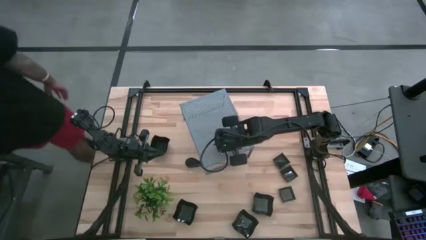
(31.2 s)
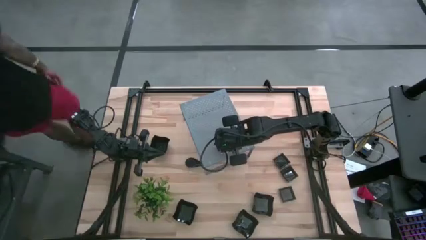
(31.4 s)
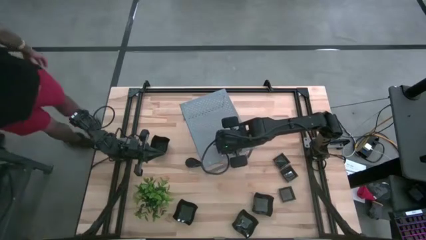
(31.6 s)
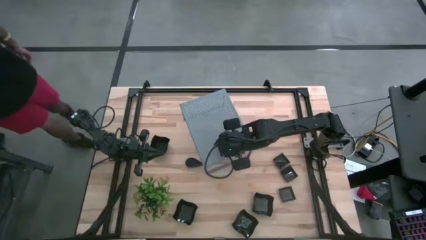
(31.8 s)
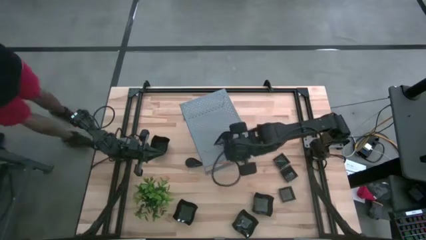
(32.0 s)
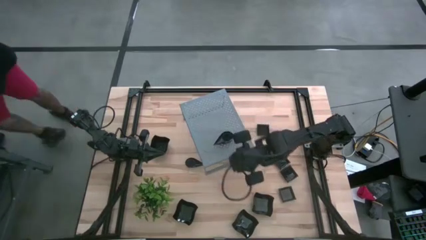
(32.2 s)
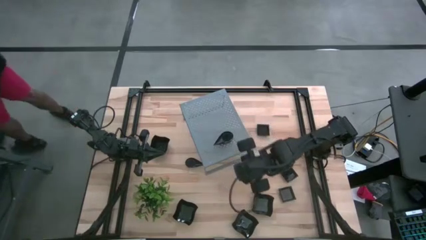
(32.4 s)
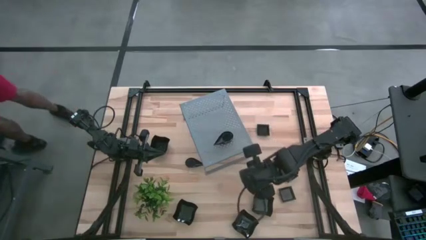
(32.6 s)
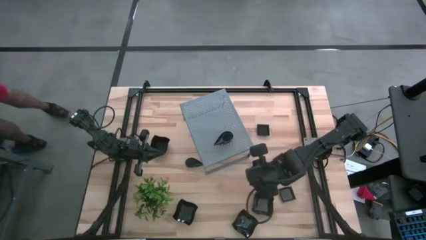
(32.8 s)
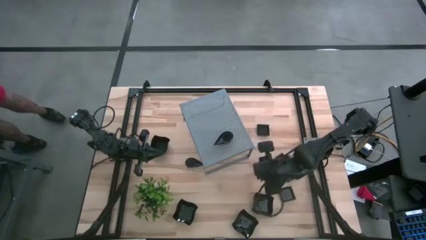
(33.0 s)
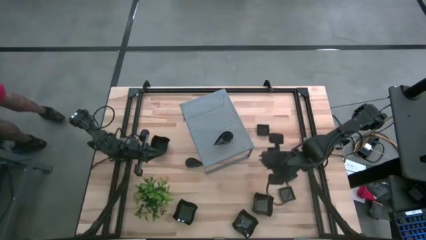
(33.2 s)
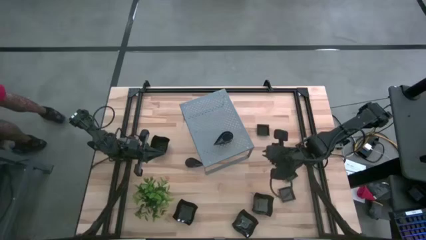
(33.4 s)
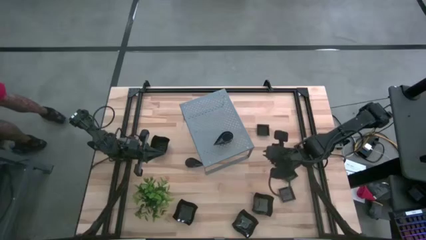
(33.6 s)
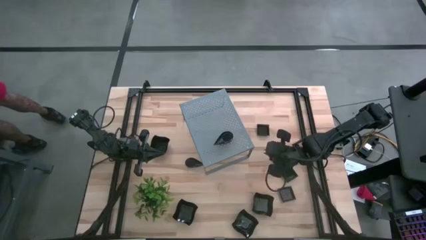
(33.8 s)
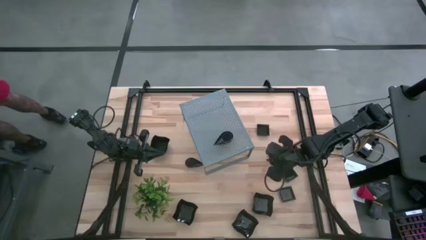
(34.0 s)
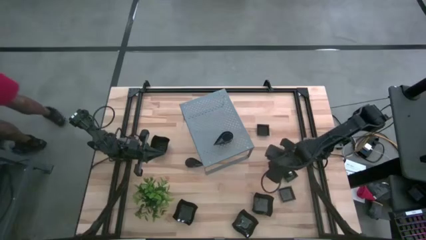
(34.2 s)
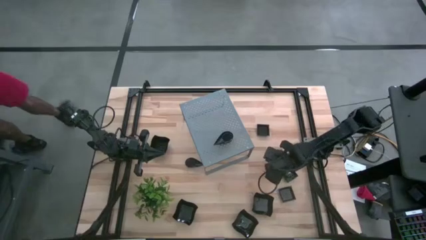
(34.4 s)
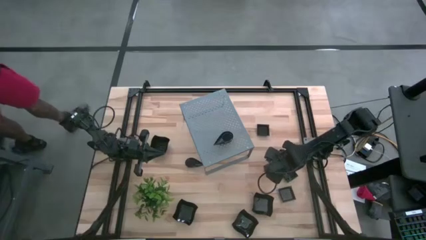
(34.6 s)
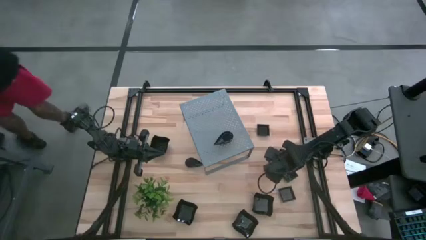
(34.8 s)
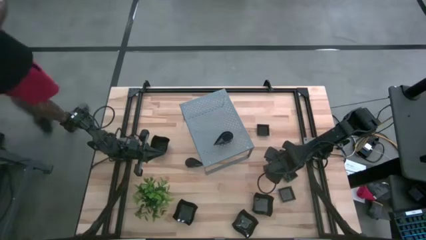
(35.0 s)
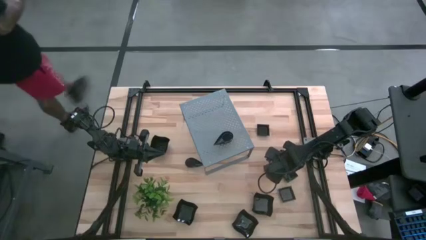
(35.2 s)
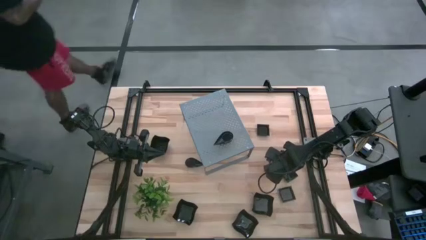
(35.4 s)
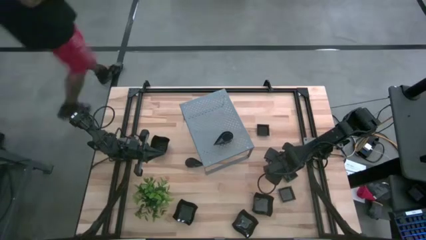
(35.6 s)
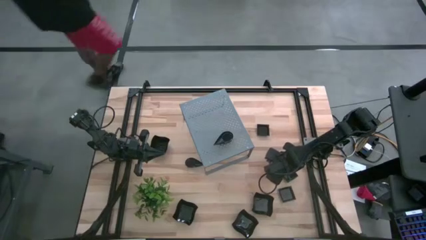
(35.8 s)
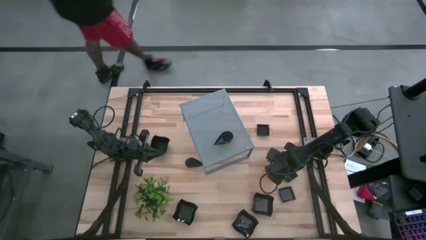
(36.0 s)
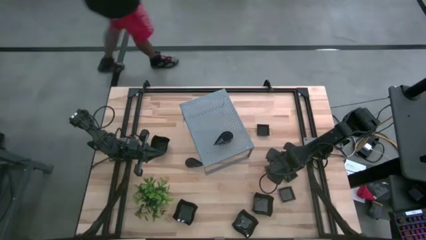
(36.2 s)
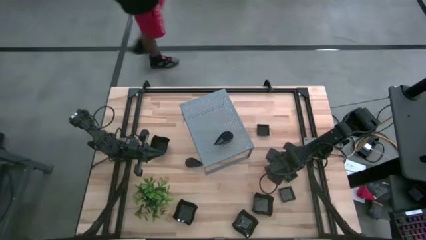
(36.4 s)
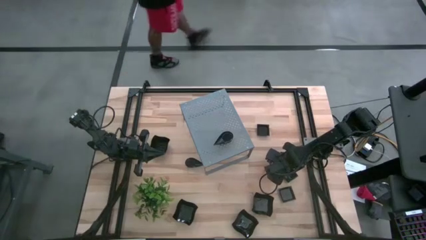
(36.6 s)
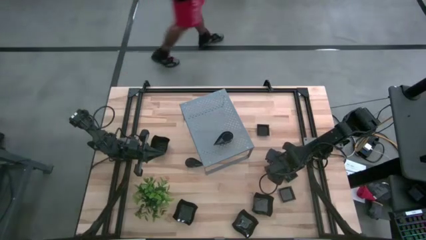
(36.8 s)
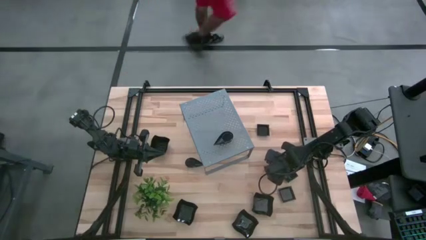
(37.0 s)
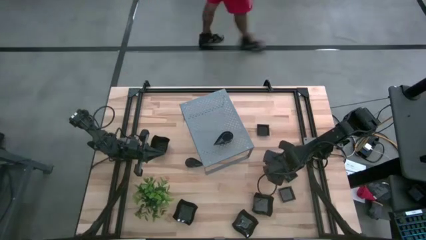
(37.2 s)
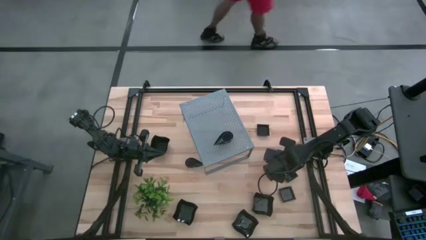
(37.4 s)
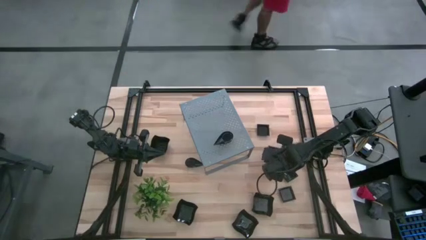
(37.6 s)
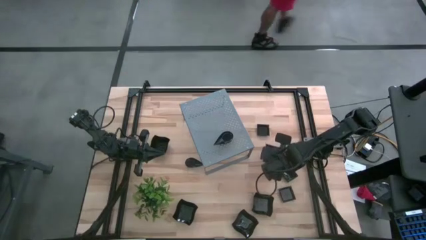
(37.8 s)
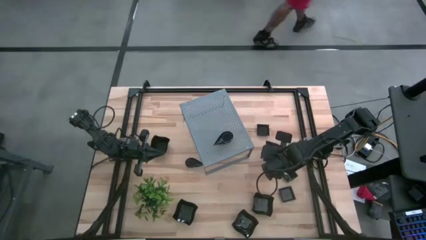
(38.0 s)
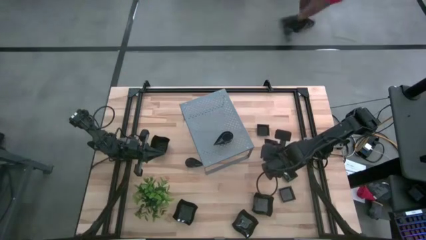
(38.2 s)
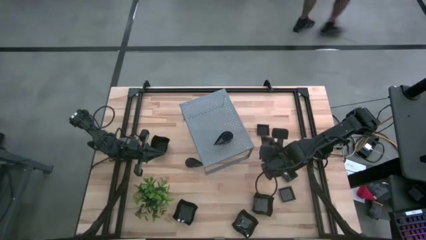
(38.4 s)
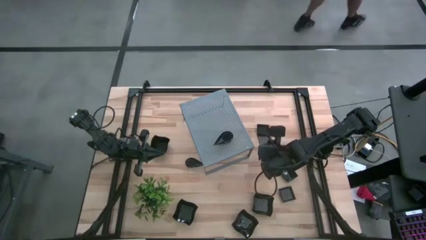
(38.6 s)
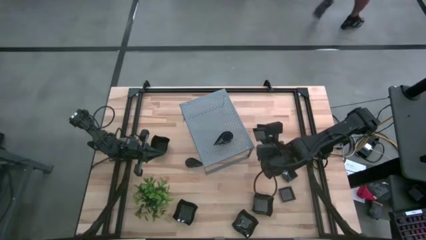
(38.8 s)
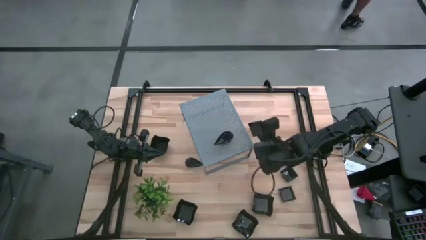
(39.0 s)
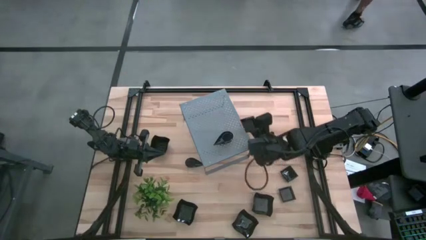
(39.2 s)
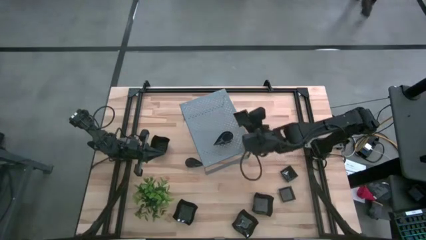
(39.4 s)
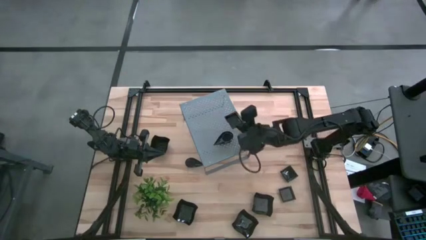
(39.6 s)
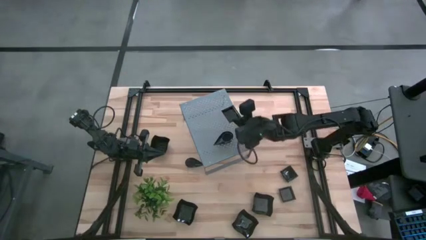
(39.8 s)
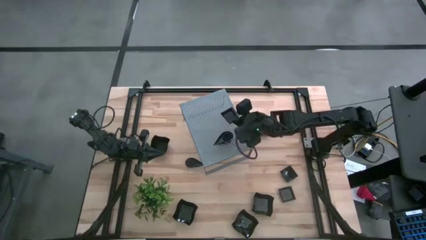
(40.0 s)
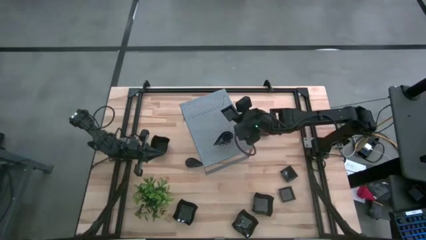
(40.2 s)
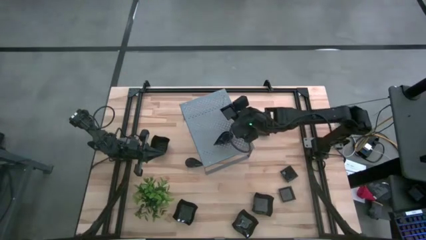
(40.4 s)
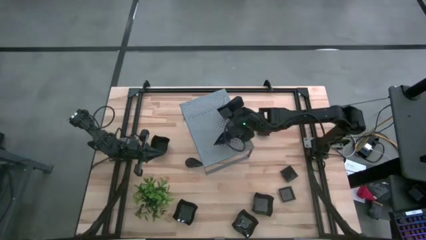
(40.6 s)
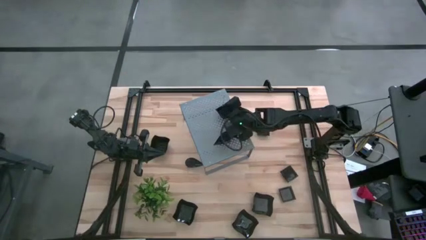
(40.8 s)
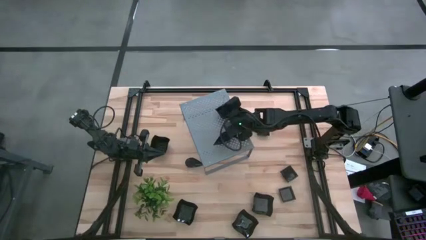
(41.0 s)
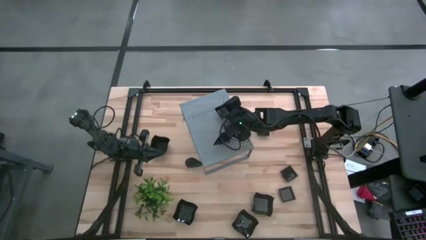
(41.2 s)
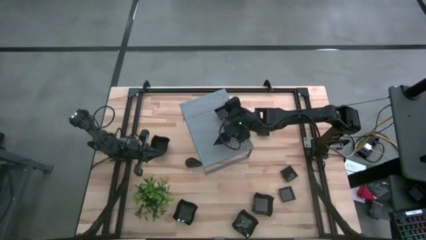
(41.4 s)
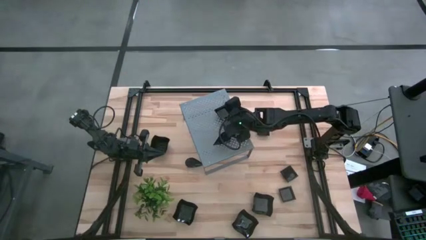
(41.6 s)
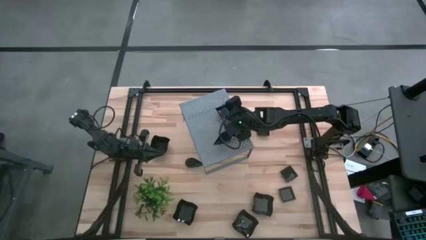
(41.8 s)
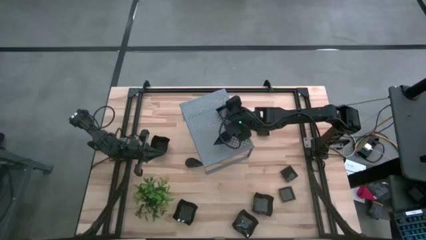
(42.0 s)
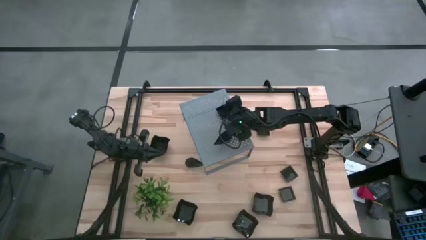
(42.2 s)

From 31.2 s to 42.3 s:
Task: Pick & Place Mini shaped plates
Put the square plate on the shelf
